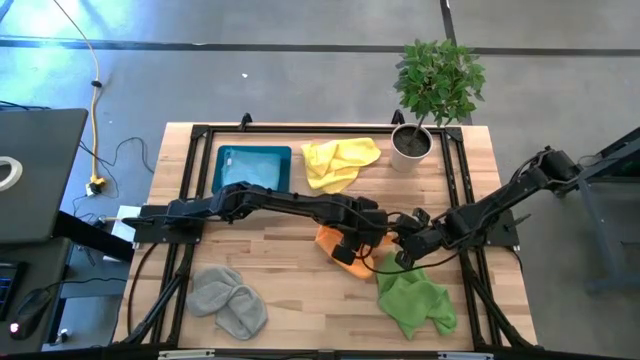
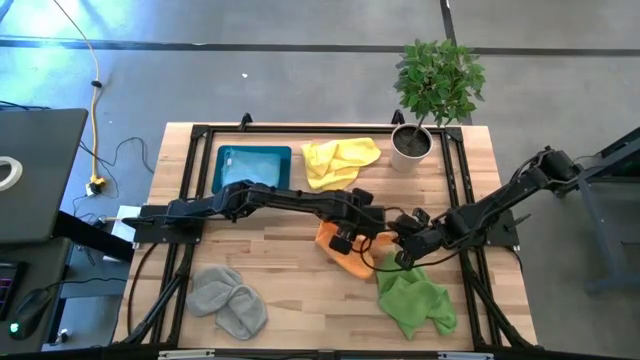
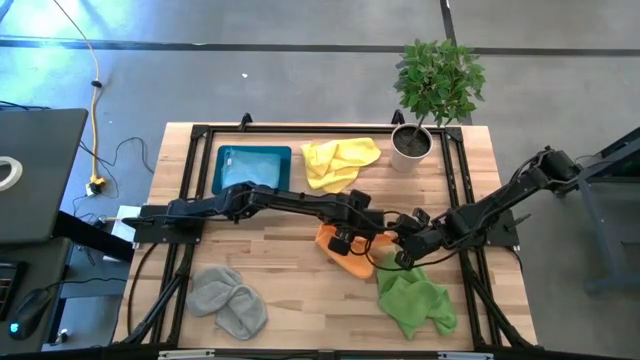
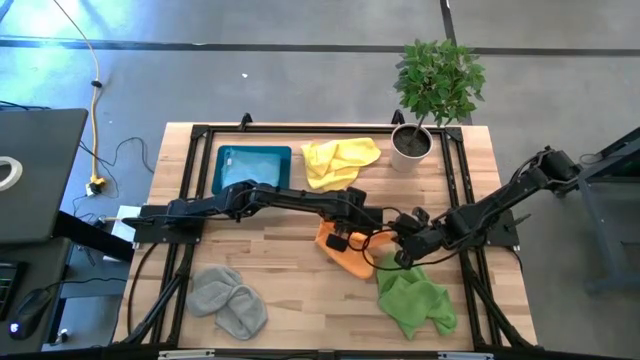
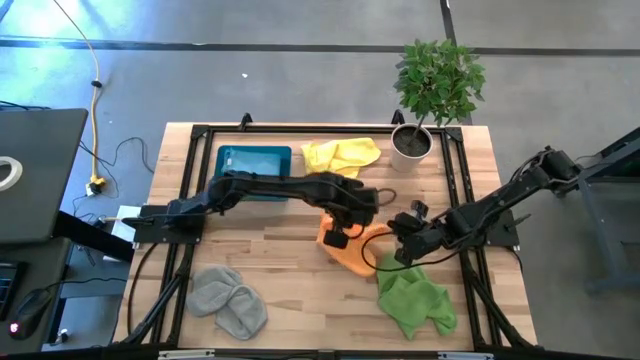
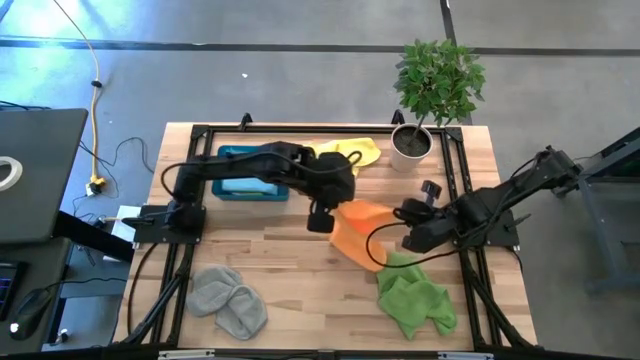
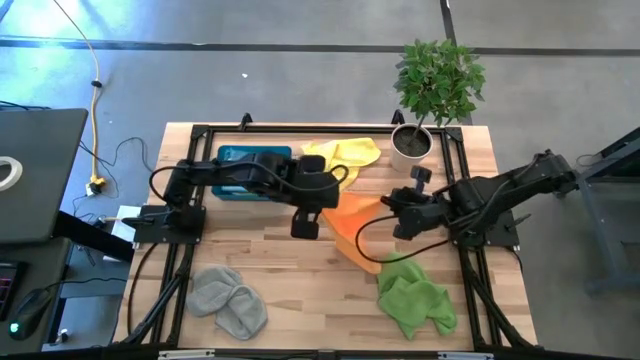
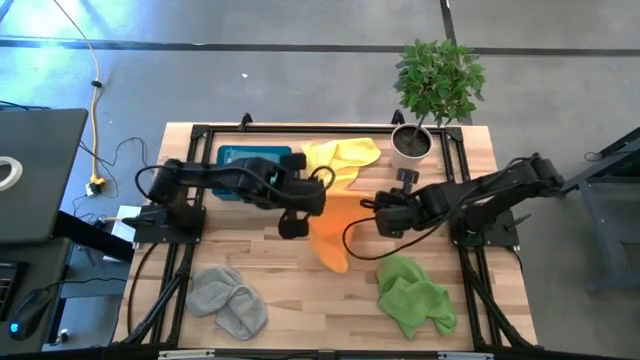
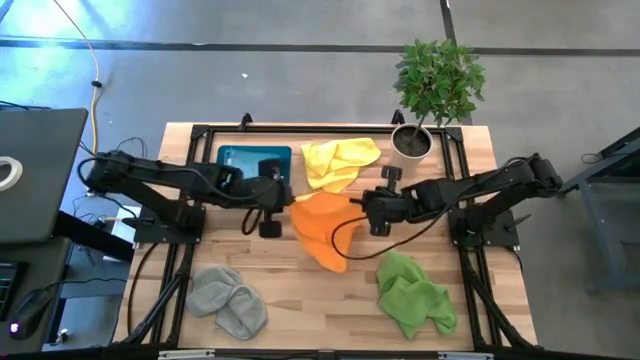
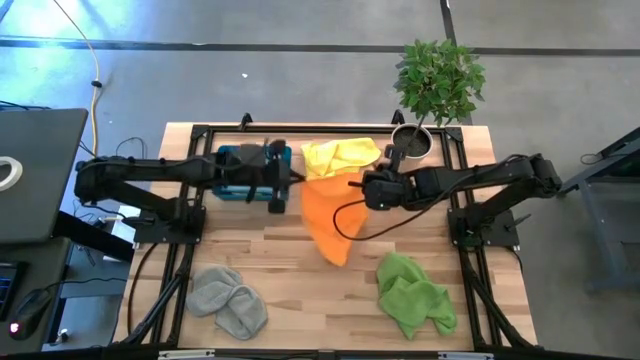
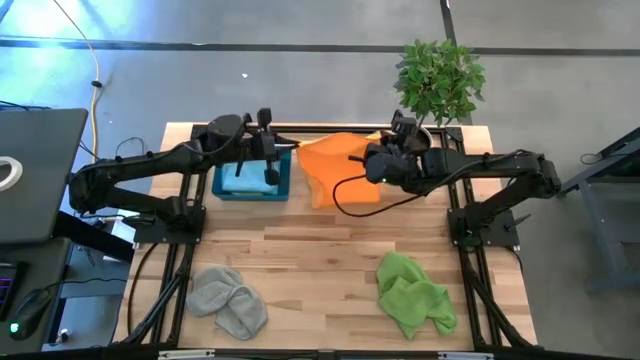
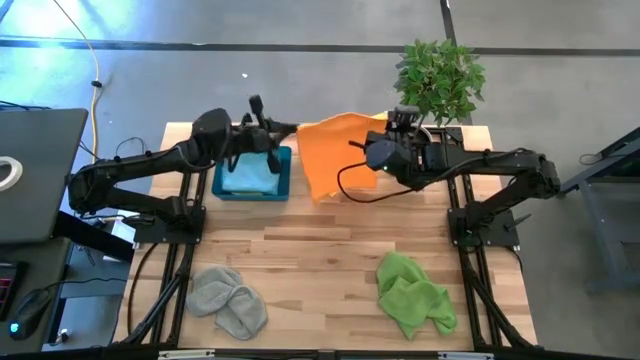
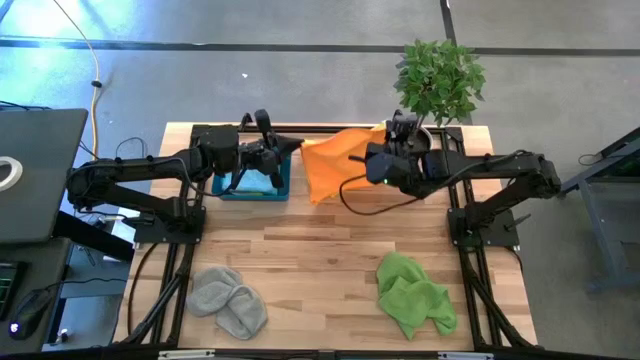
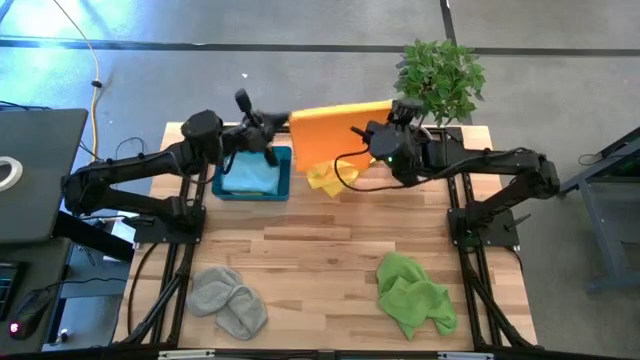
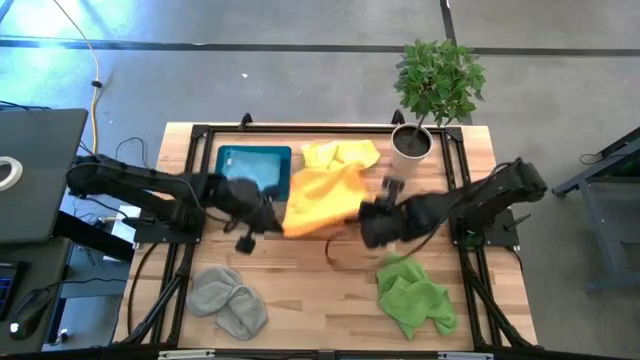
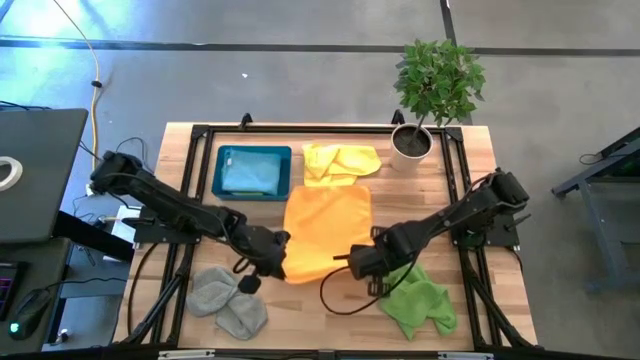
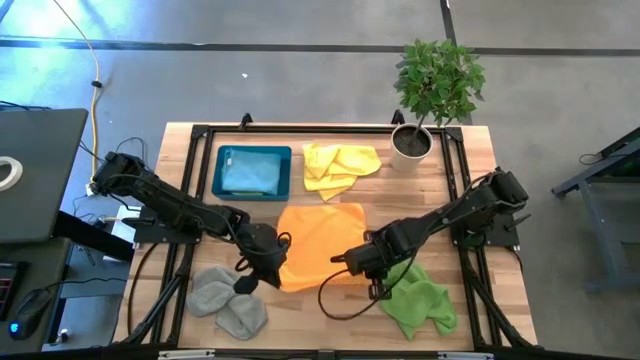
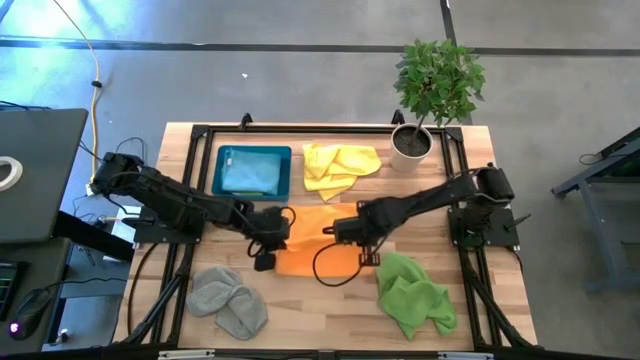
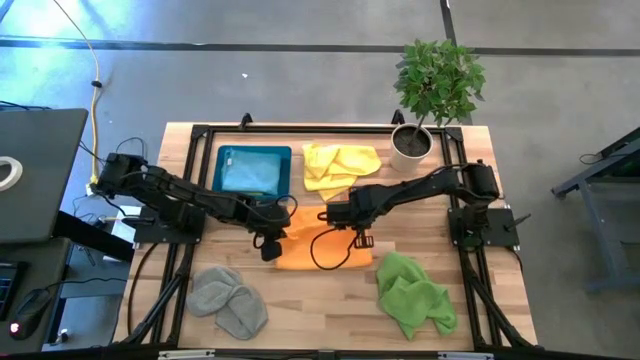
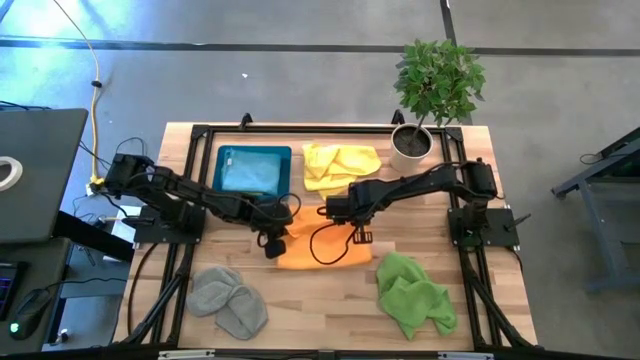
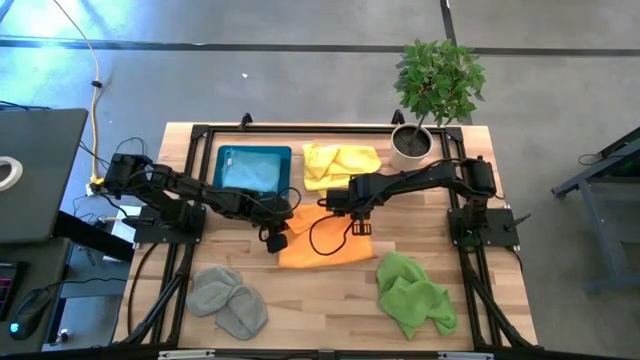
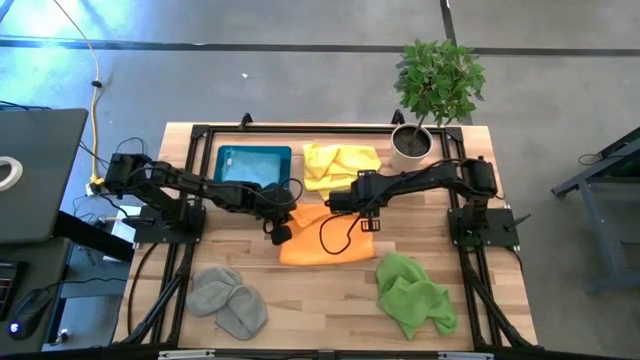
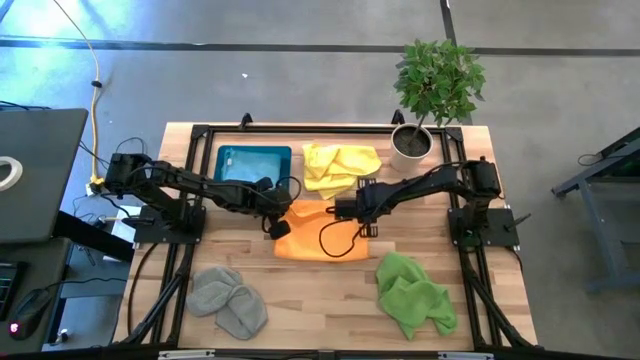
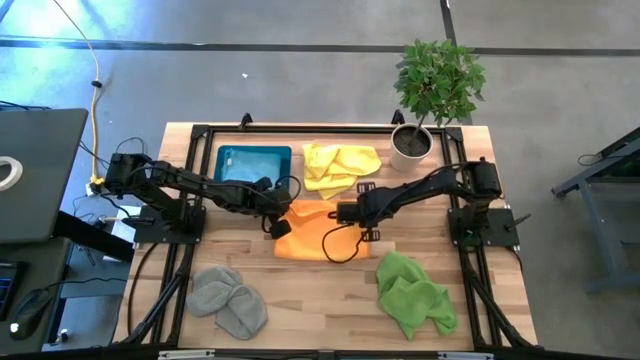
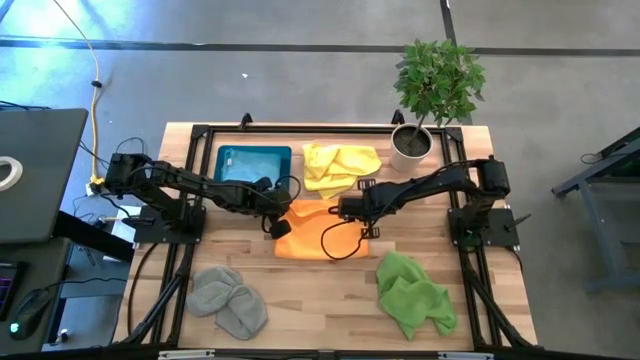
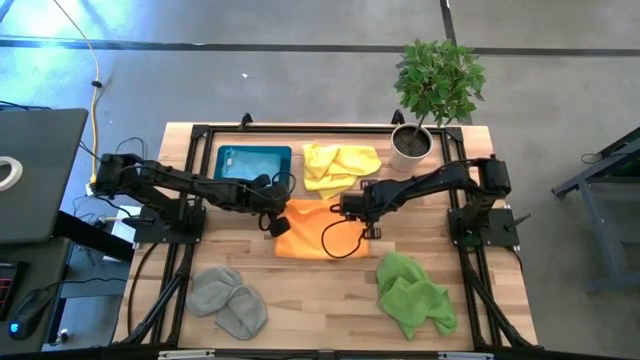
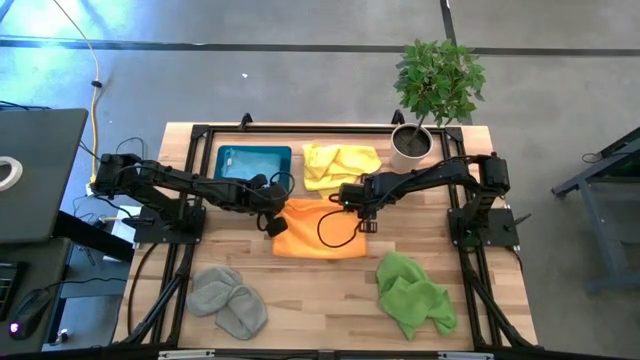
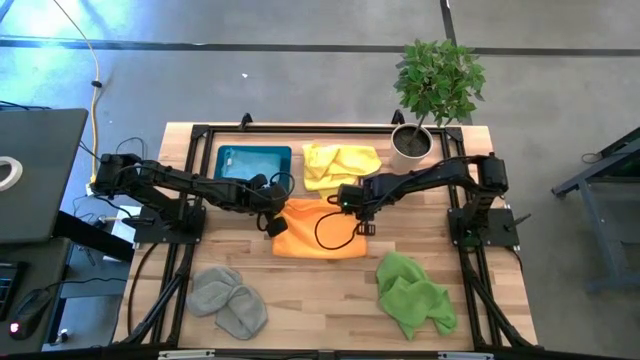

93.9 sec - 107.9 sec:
Task: Fold microfiber towels
Fold the orange microfiber cloth

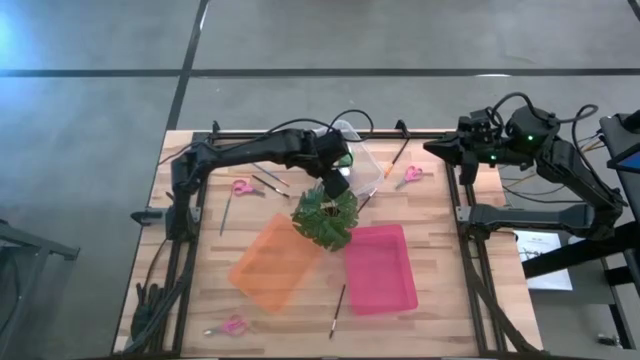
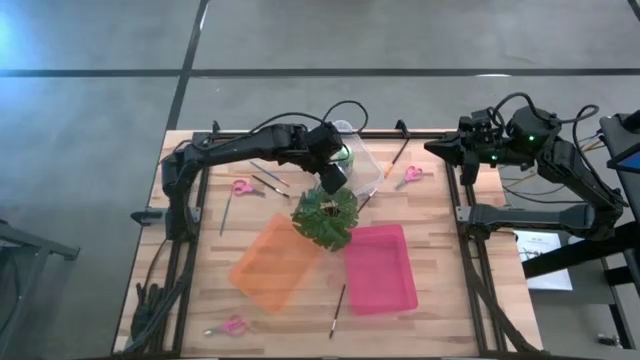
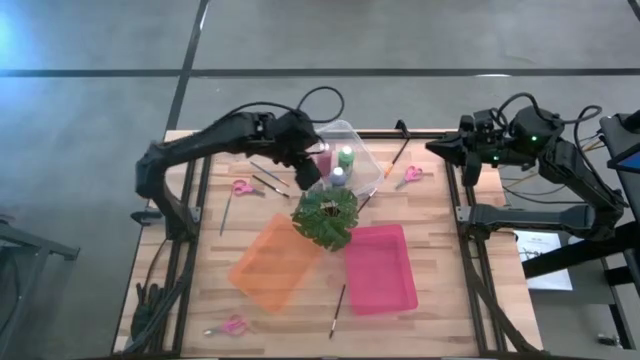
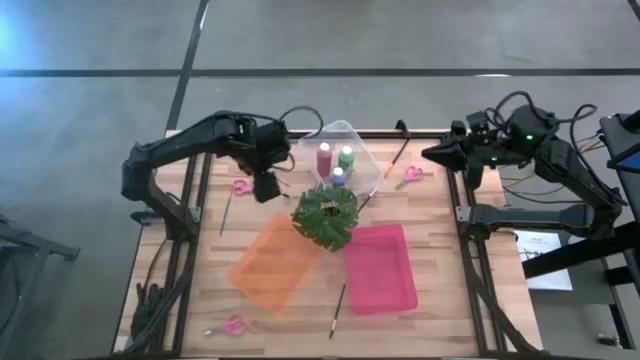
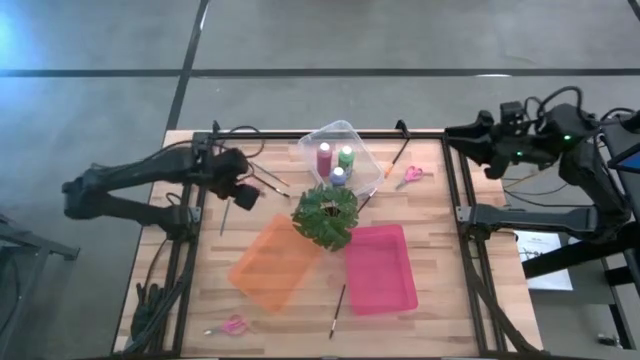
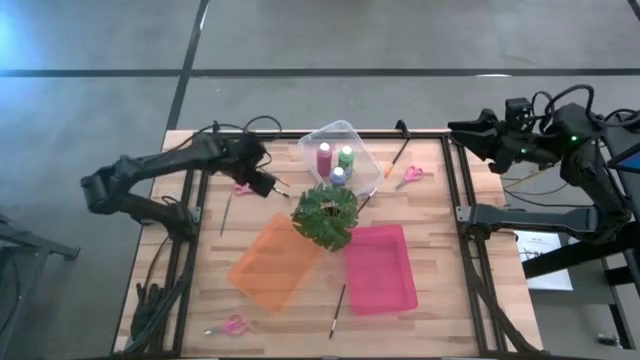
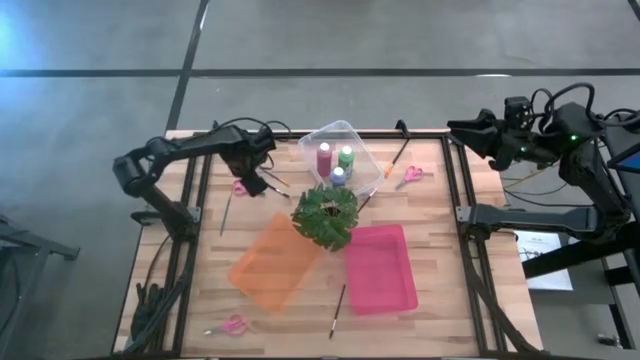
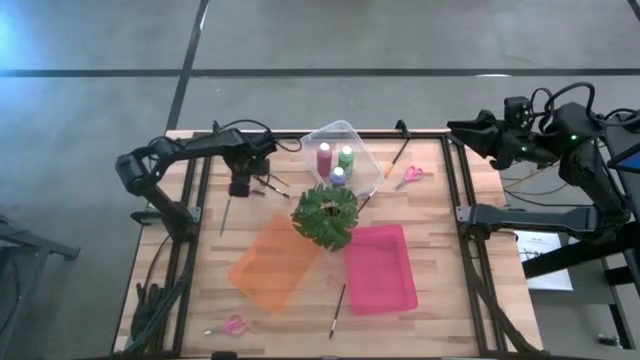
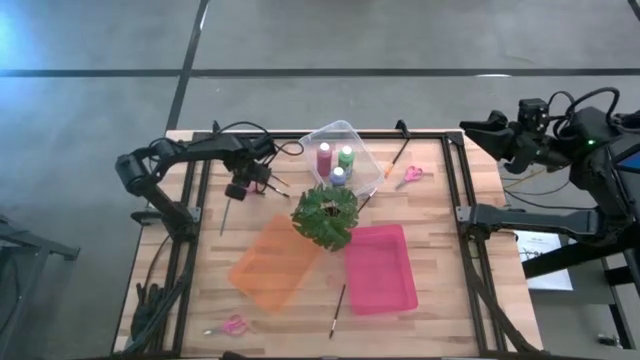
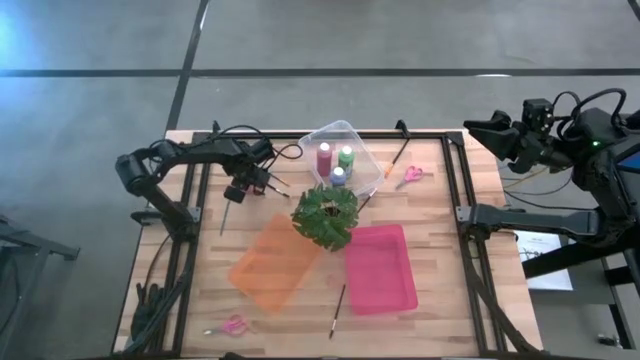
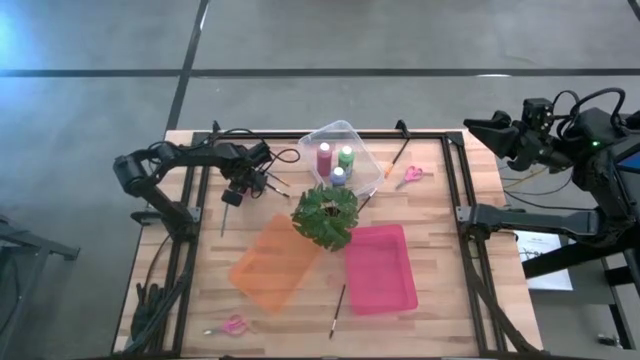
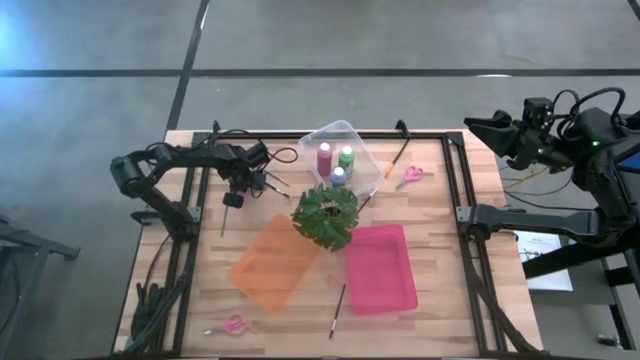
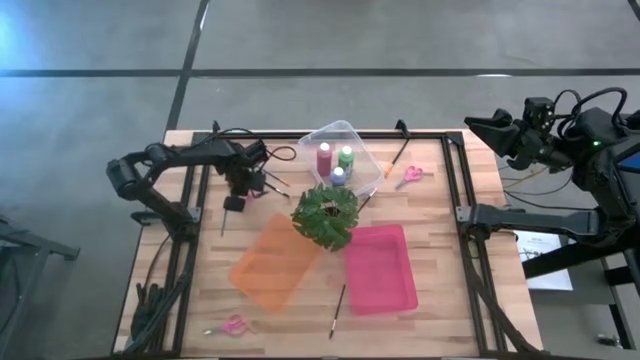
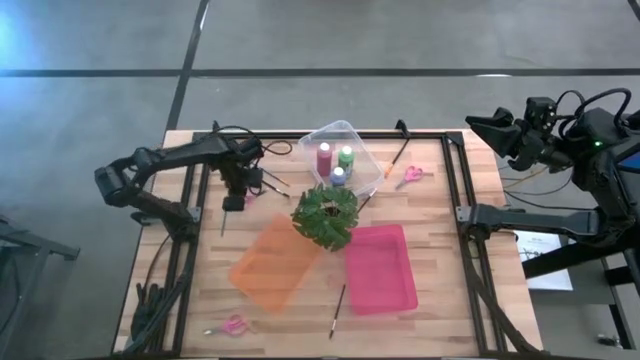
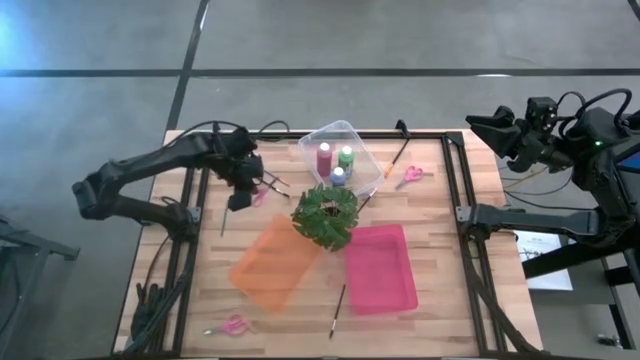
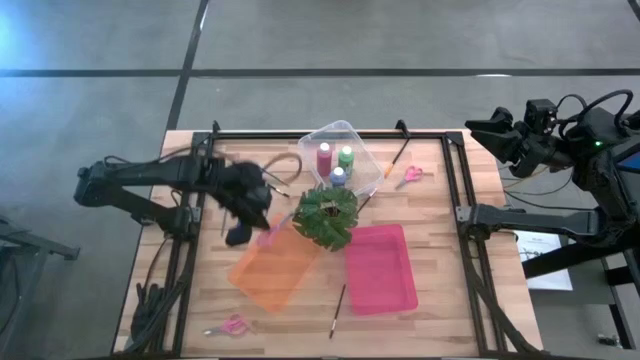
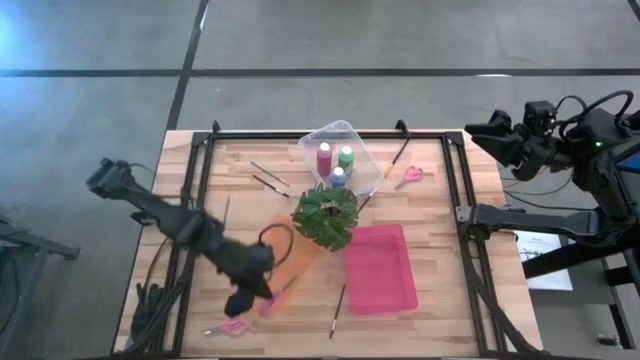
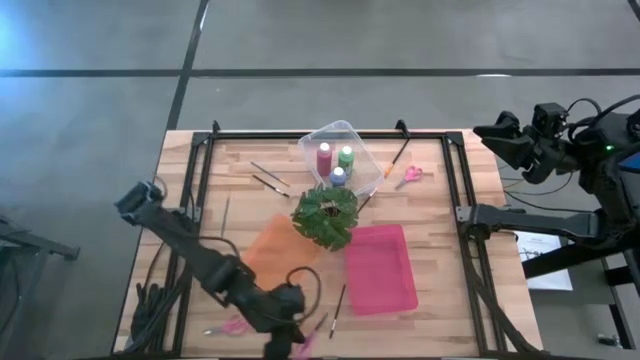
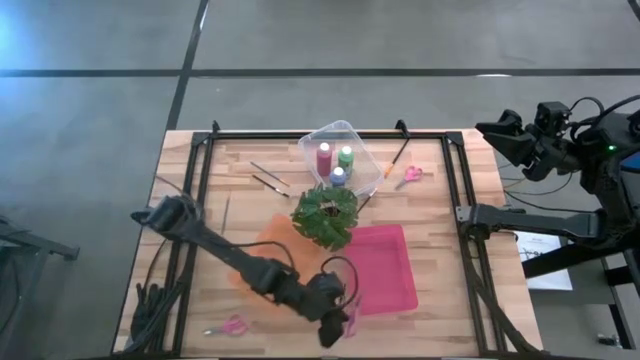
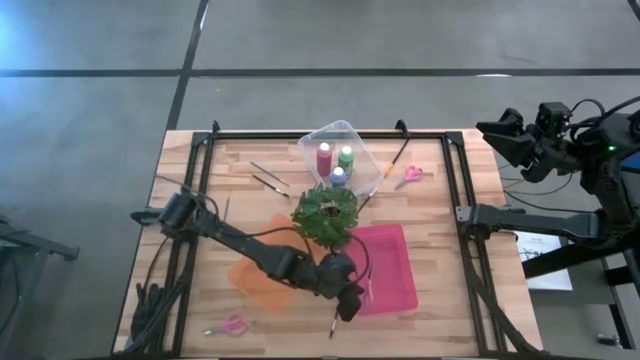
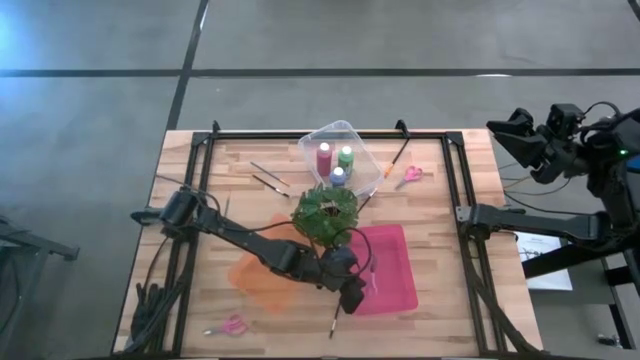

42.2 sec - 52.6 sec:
Task: Pick & Place Paint Supplies
Put the top left pink scissor into the pink bin
